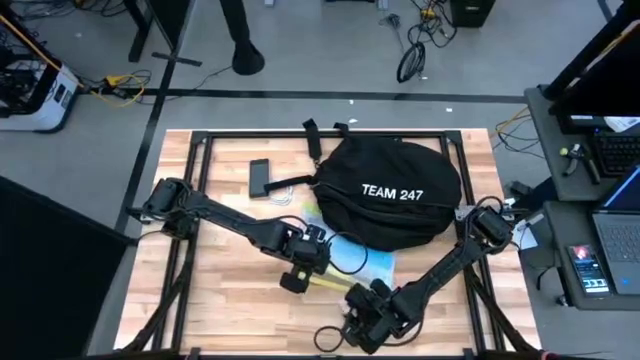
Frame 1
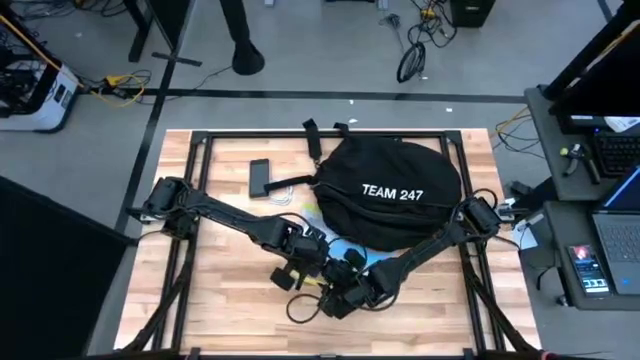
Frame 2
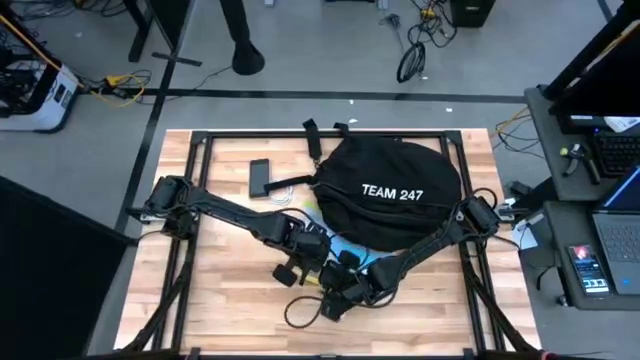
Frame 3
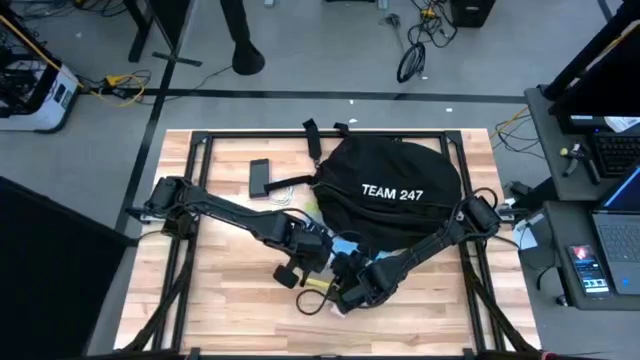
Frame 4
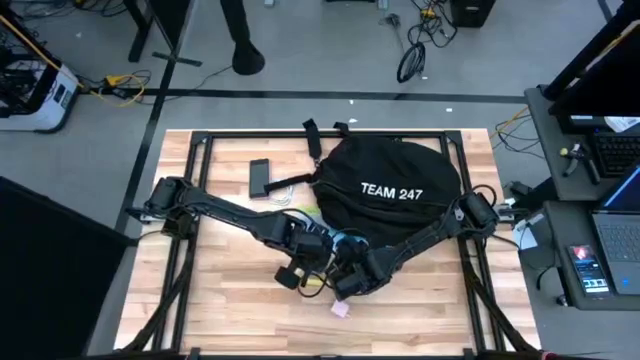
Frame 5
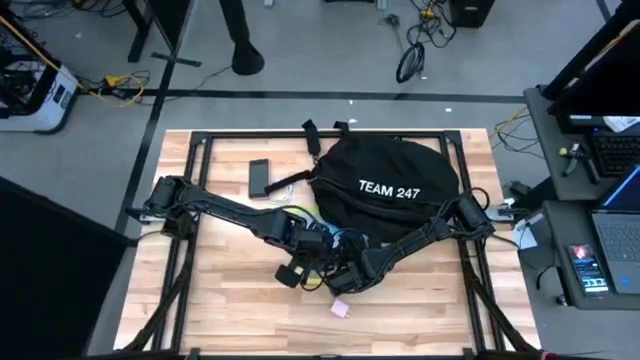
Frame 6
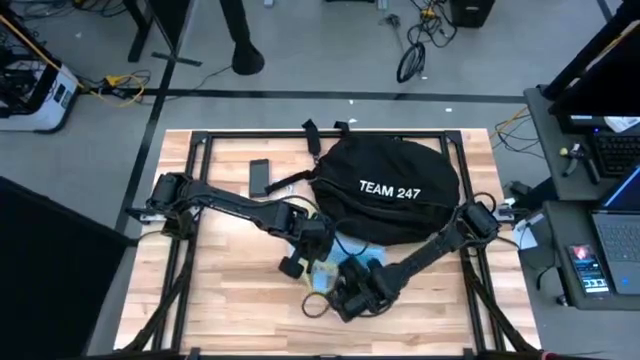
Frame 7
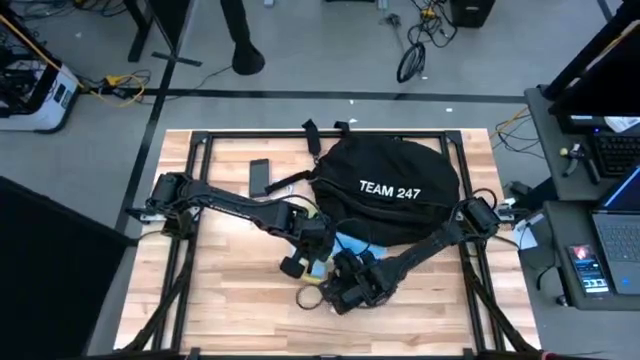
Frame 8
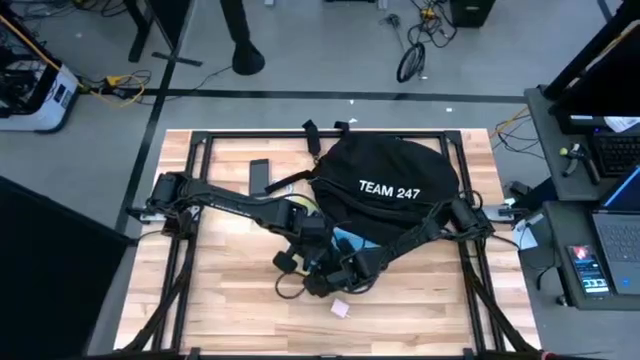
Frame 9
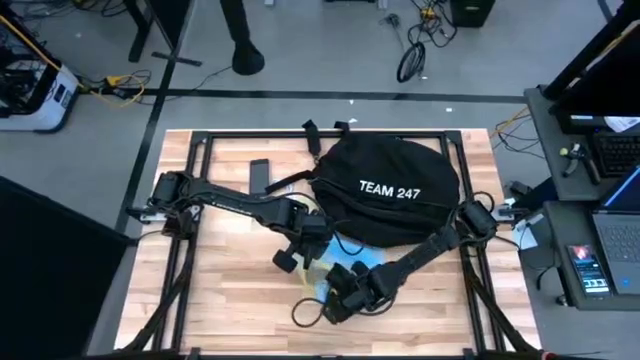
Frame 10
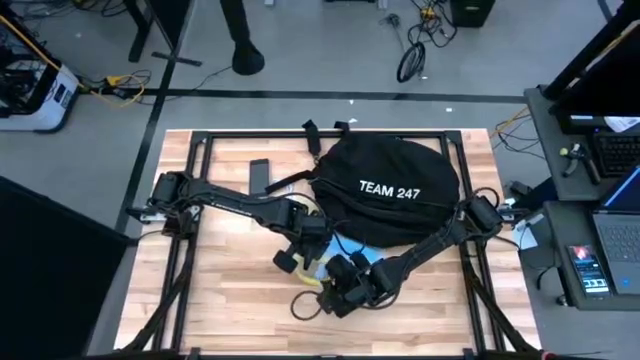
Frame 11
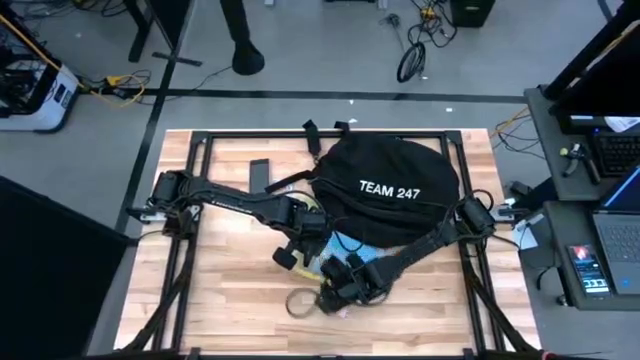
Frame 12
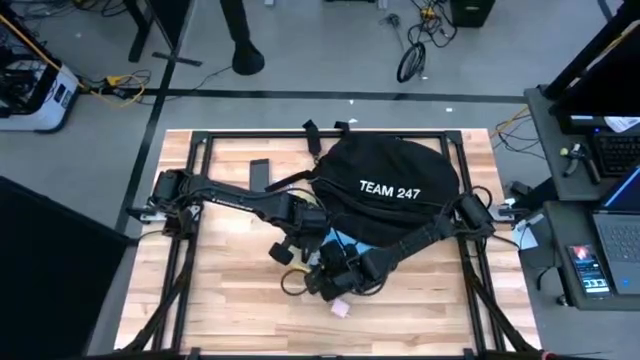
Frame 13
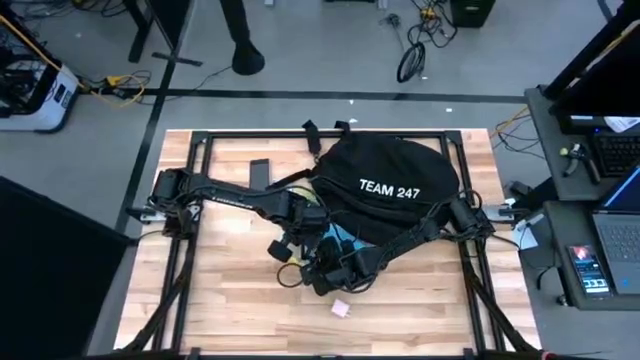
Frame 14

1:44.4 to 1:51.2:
Task: Unpack backpack
Remove the white charger adapter from the green zip bag

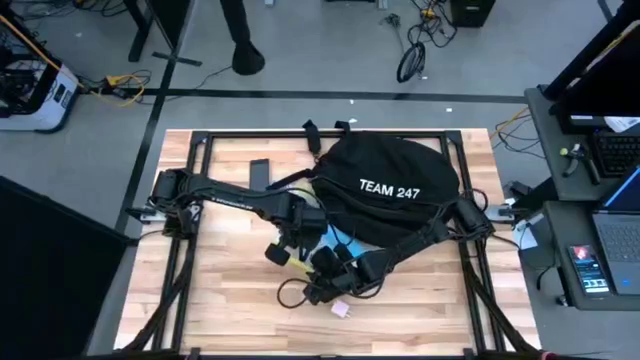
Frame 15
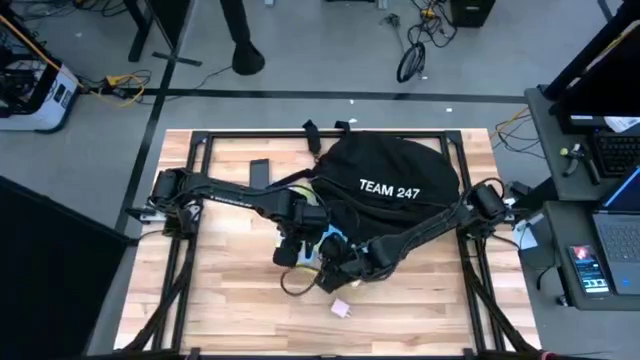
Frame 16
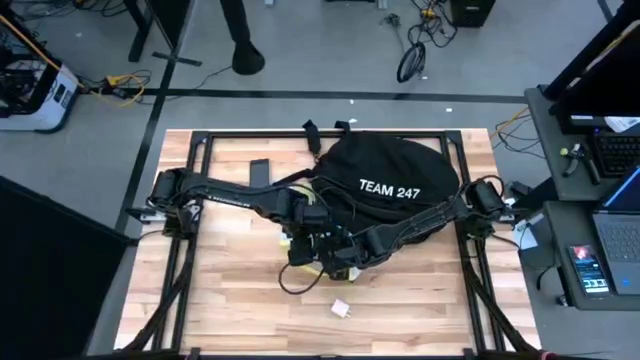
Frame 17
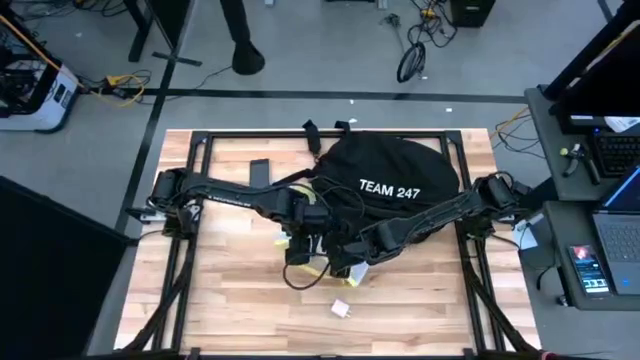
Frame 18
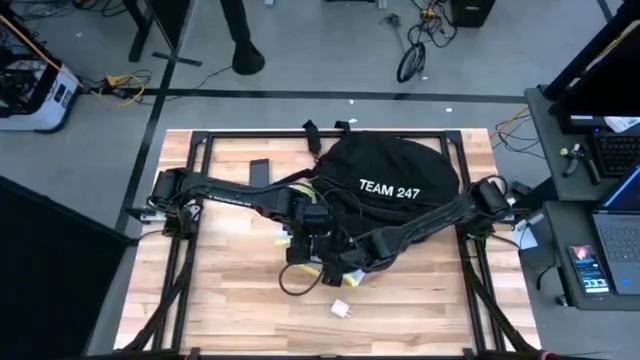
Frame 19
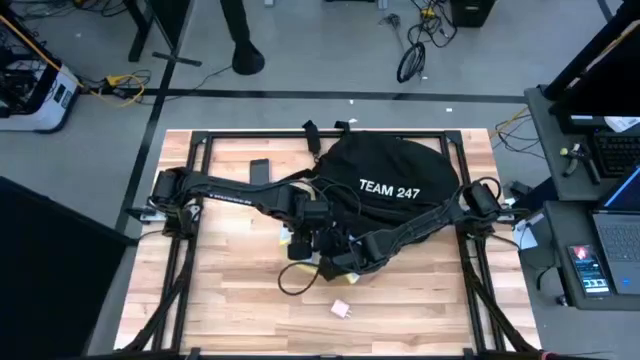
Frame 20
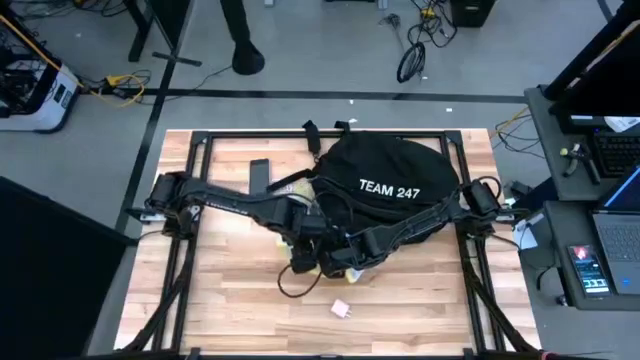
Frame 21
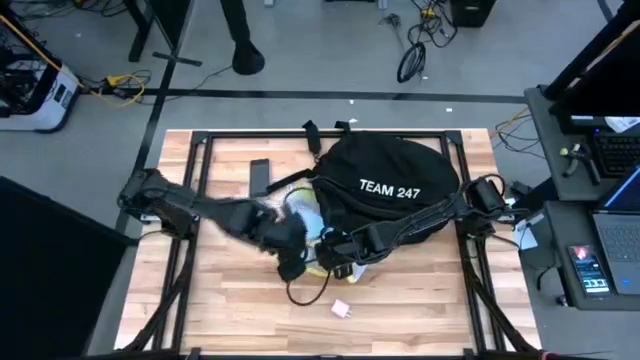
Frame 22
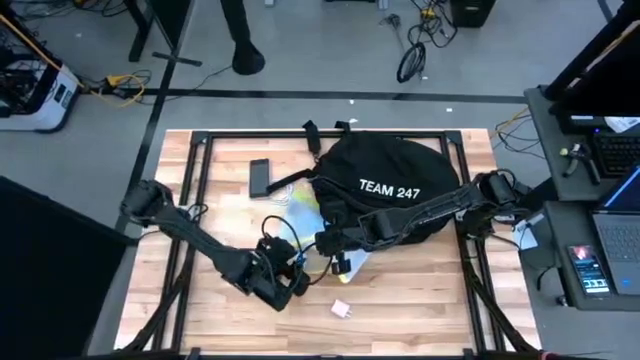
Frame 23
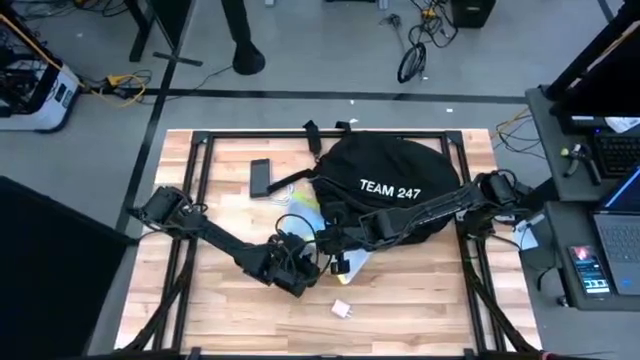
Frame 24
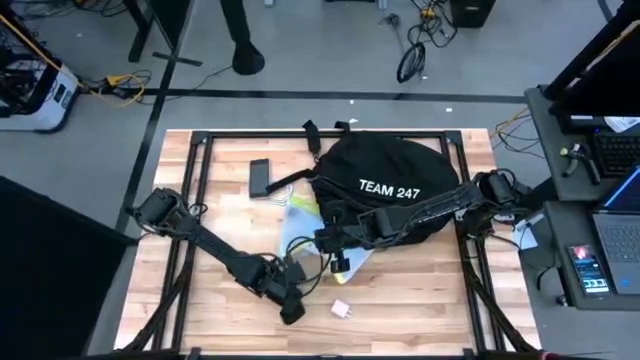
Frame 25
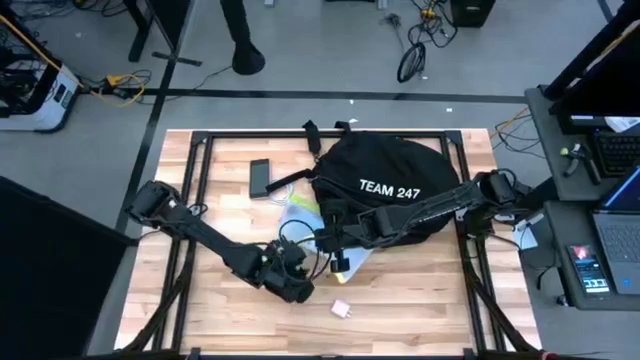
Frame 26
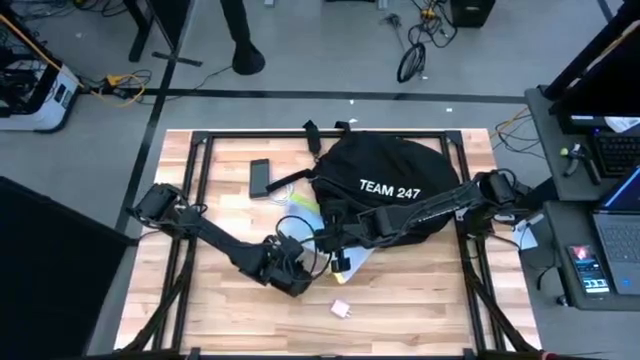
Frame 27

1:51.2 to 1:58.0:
Remove the white charger adapter from the green zip bag

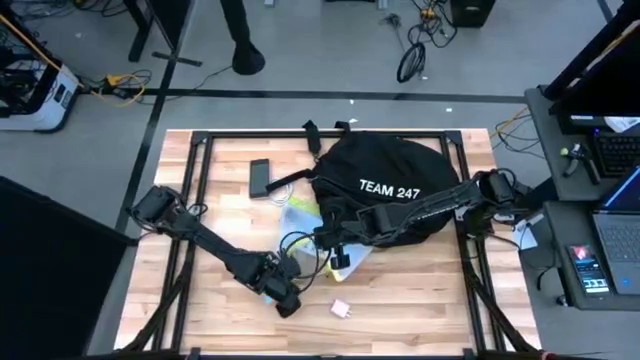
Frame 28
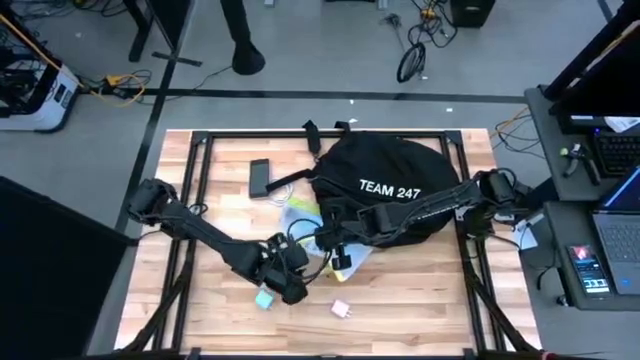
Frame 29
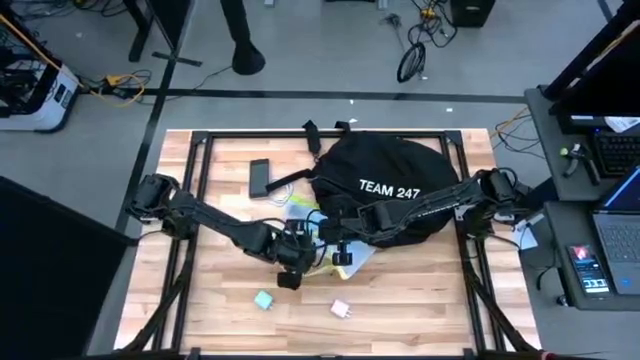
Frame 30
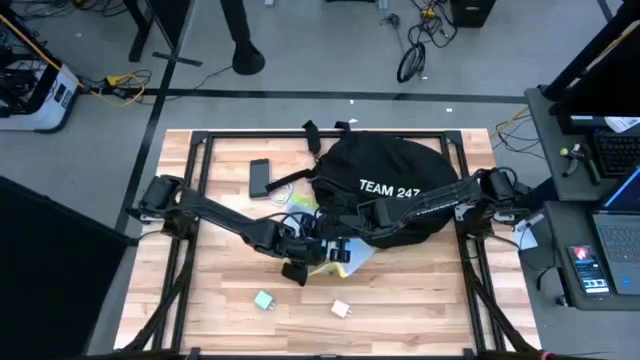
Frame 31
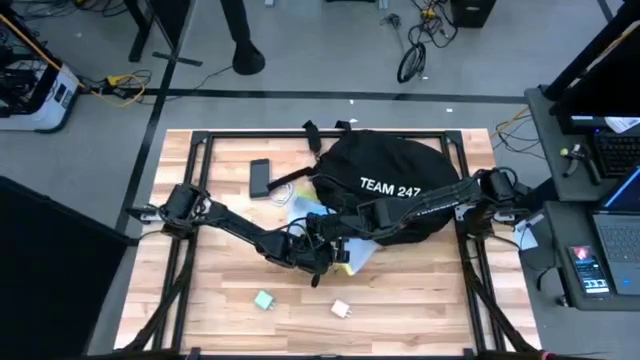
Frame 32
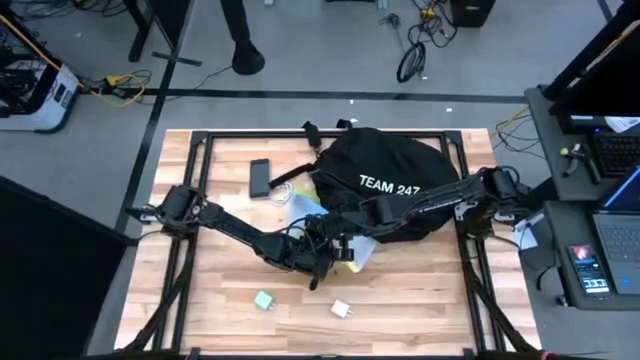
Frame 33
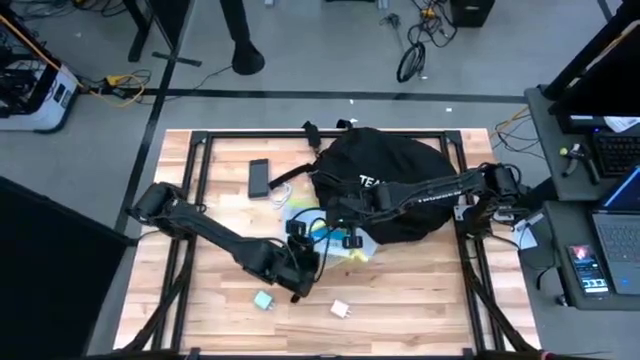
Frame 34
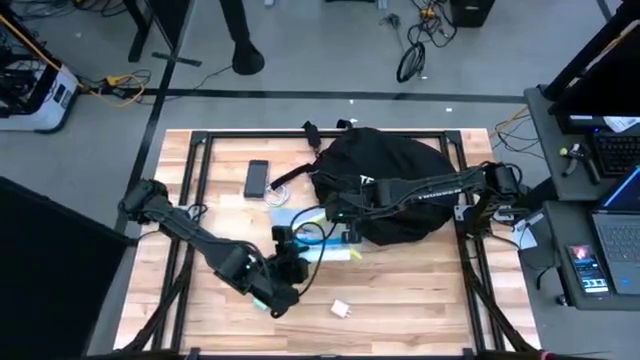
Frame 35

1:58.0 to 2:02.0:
Remove the medicine organizer from the green zip bag

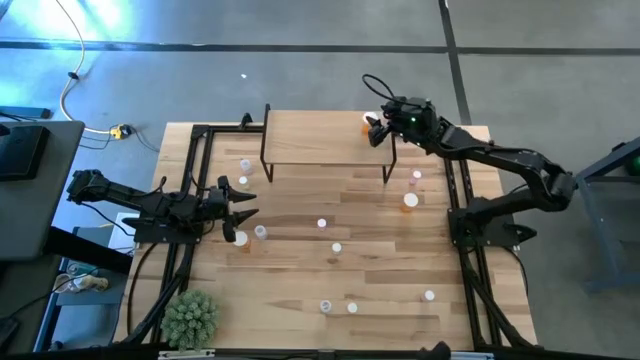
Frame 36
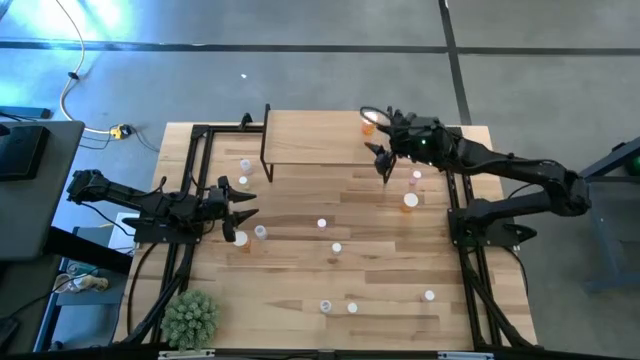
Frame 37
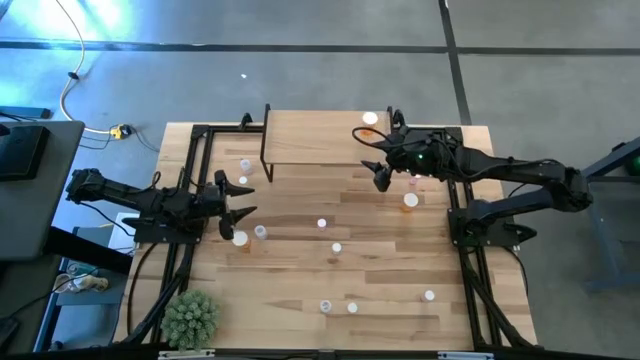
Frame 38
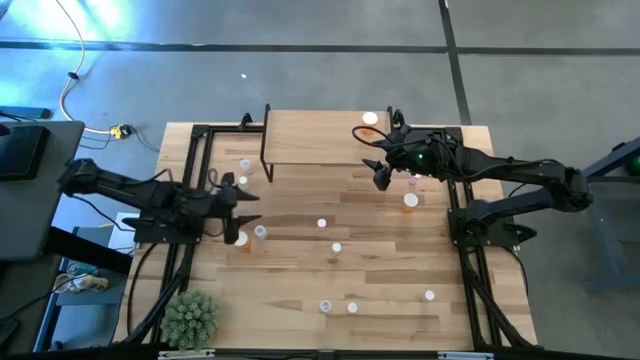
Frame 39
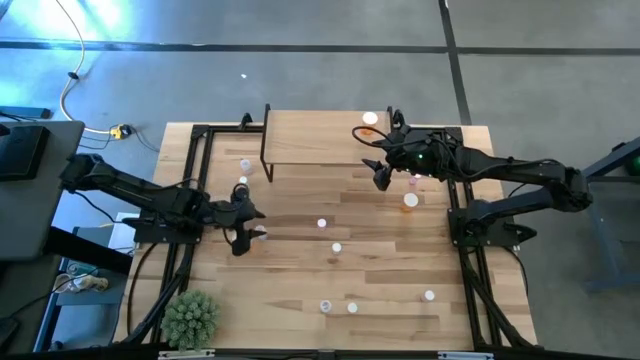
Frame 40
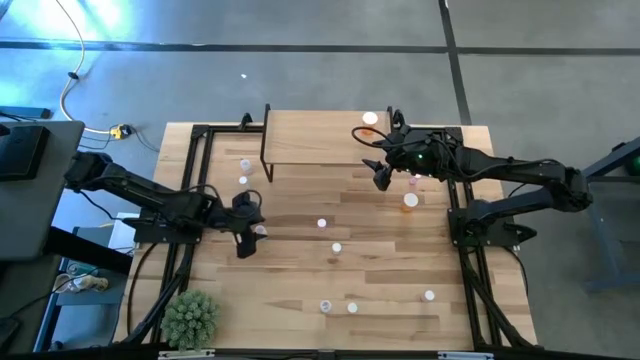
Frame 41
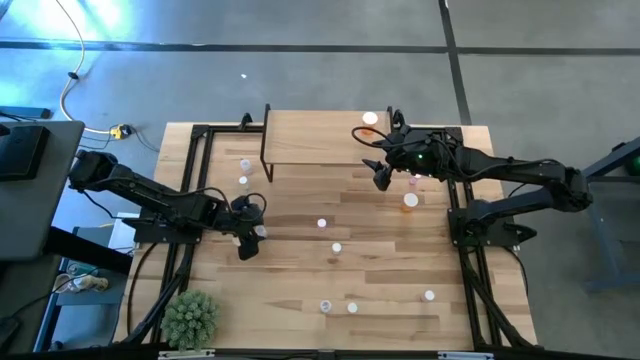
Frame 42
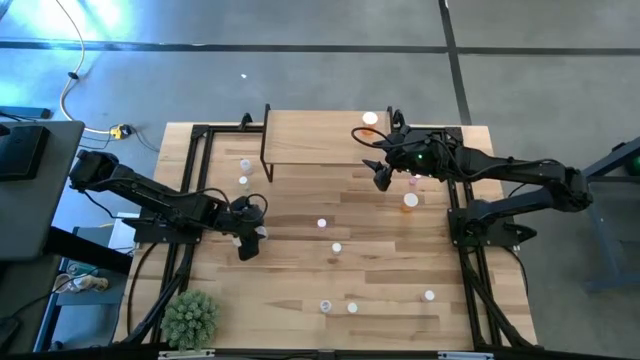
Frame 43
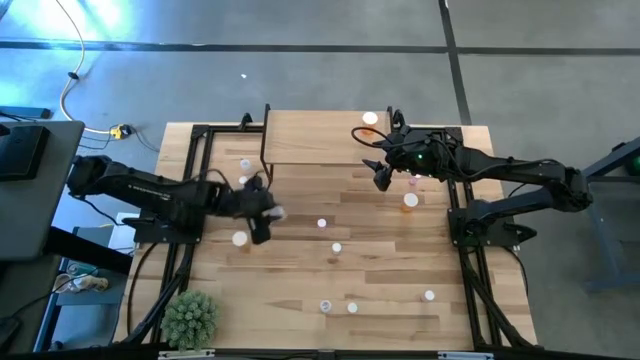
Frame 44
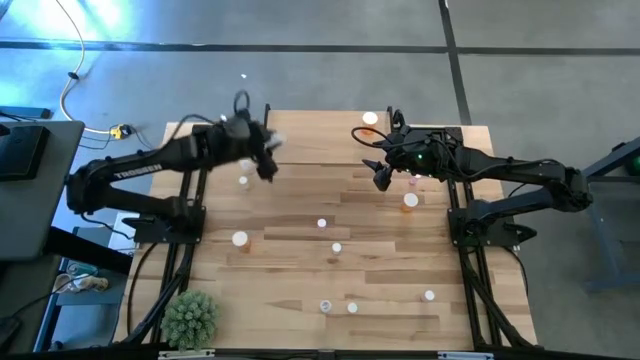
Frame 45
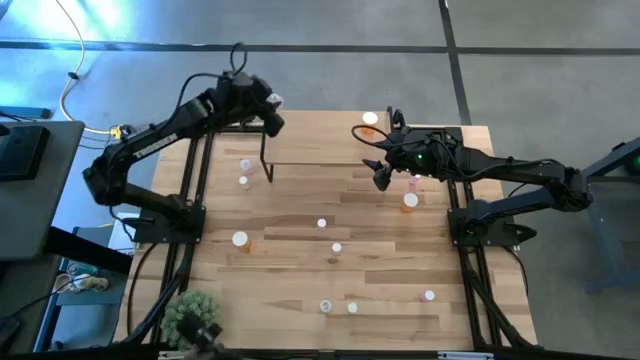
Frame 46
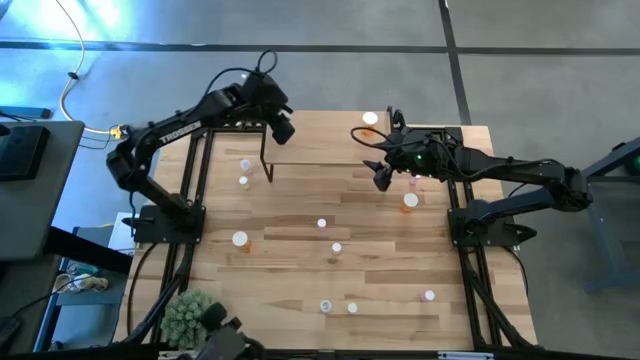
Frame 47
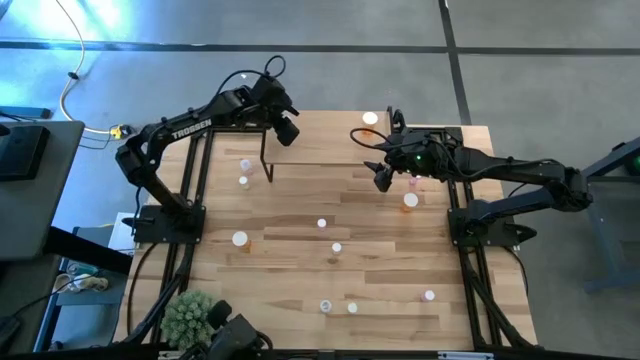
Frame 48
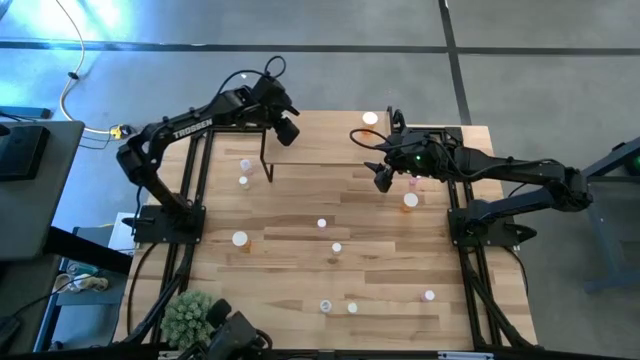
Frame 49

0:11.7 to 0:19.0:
Task: Pick and place medicine bottles onto shelf by color
Put the middle transparent pill bottle on the shelf
